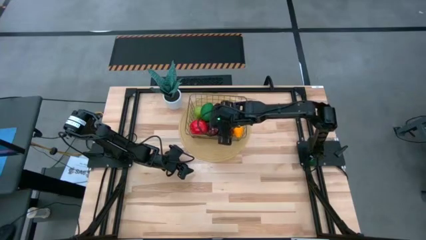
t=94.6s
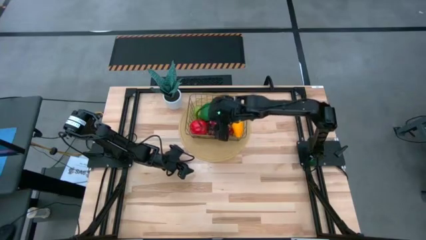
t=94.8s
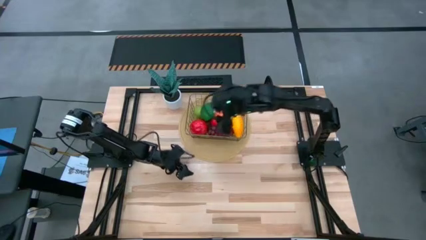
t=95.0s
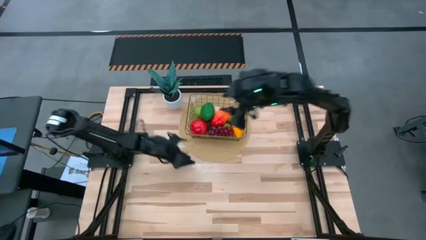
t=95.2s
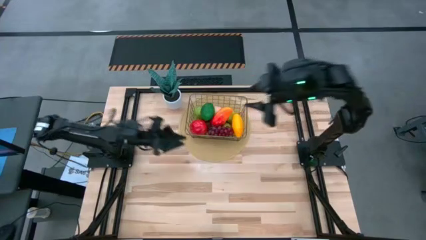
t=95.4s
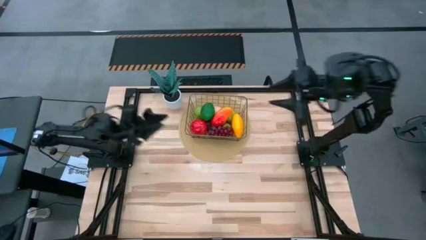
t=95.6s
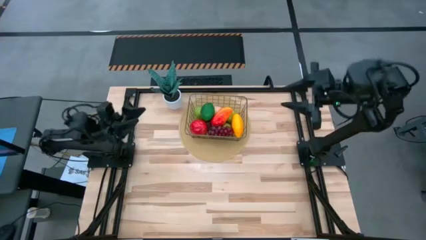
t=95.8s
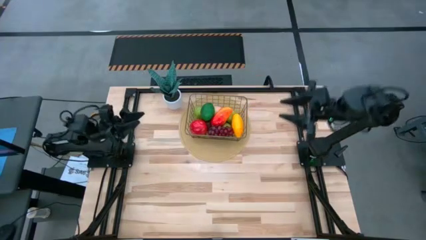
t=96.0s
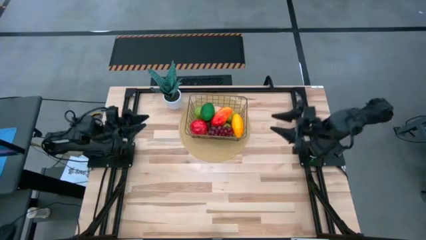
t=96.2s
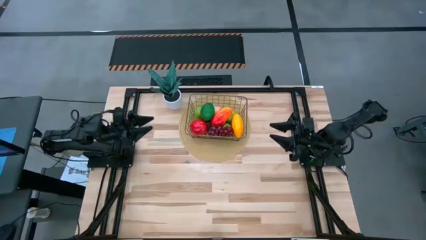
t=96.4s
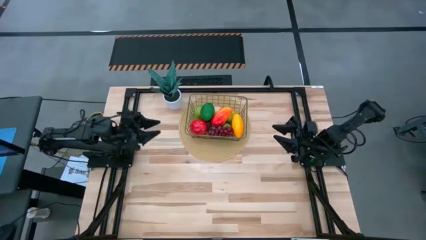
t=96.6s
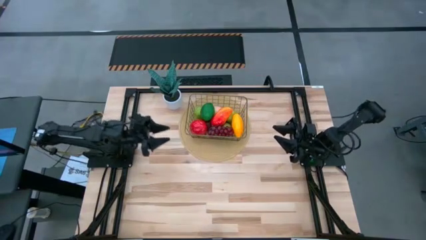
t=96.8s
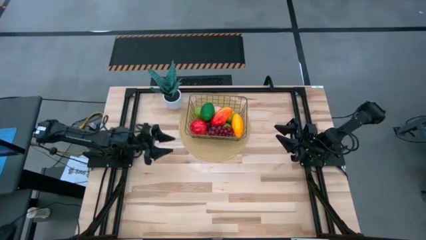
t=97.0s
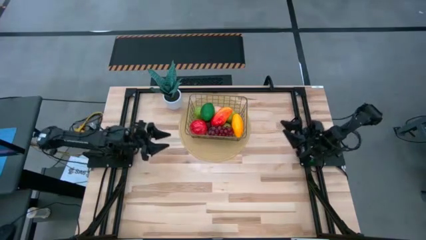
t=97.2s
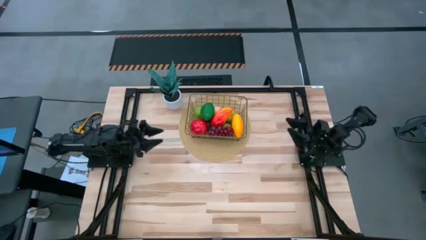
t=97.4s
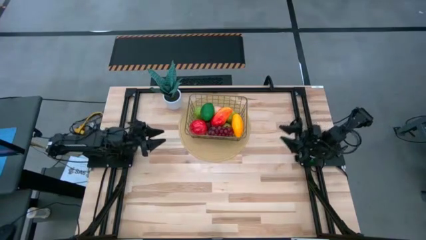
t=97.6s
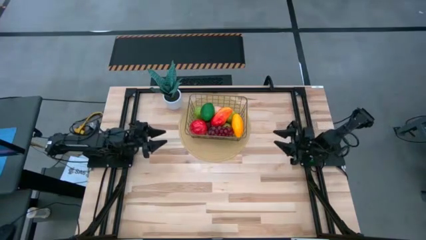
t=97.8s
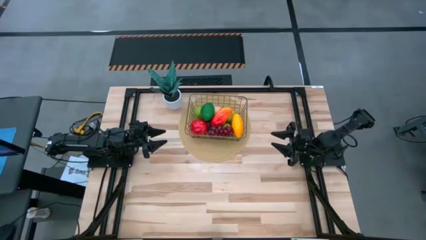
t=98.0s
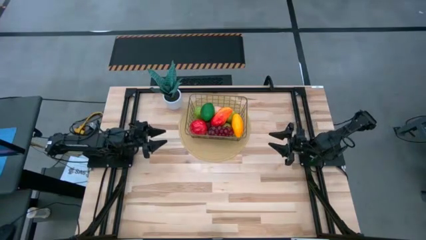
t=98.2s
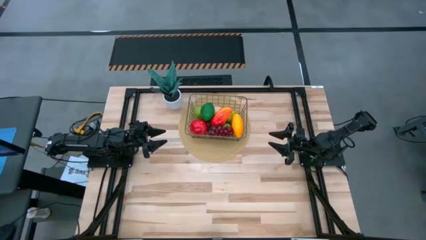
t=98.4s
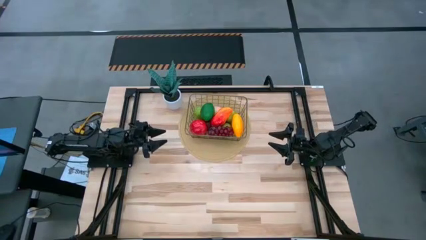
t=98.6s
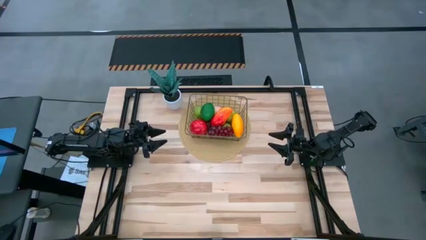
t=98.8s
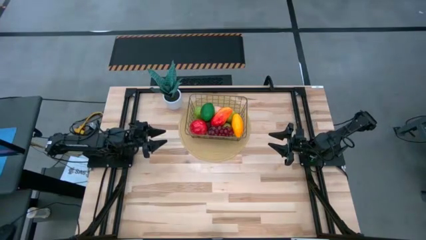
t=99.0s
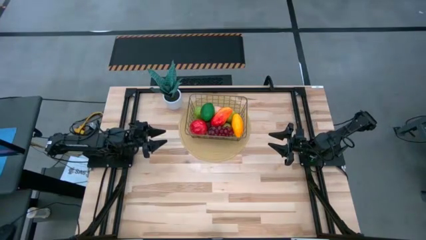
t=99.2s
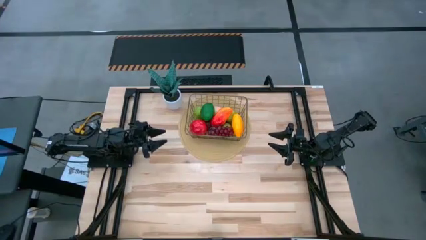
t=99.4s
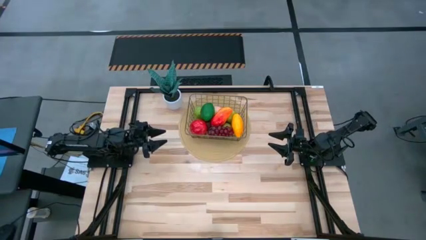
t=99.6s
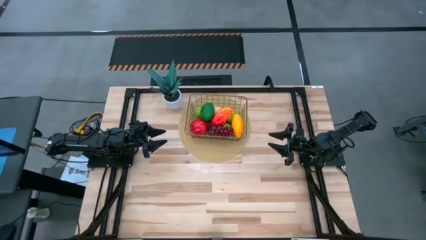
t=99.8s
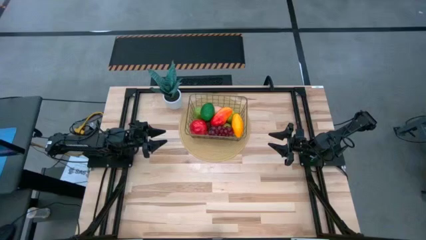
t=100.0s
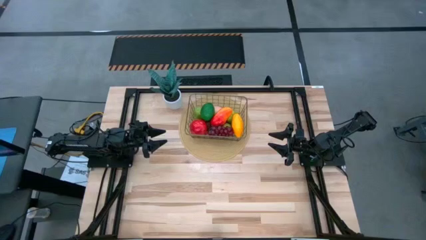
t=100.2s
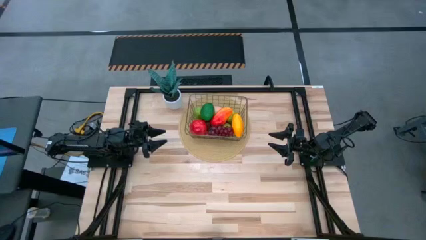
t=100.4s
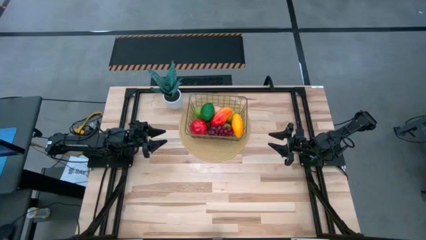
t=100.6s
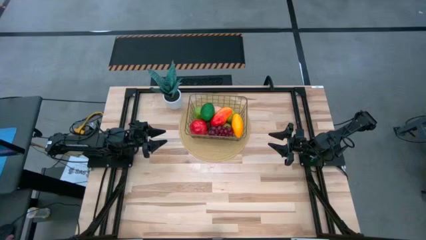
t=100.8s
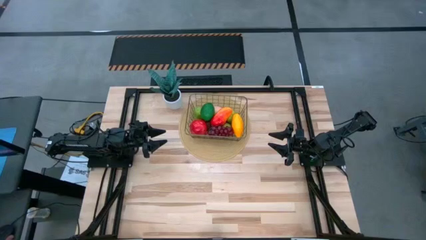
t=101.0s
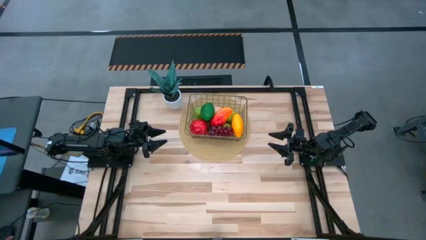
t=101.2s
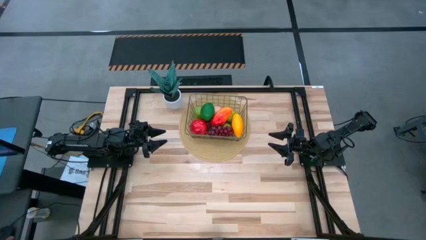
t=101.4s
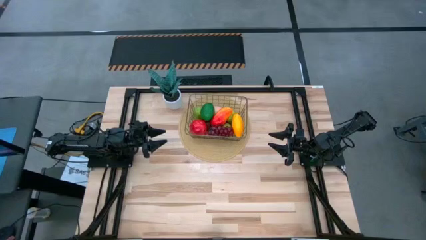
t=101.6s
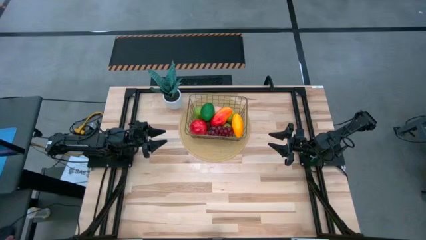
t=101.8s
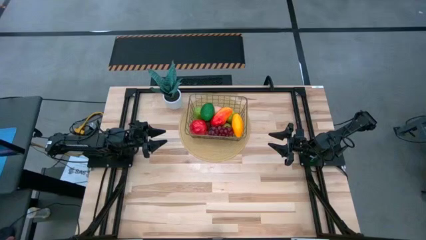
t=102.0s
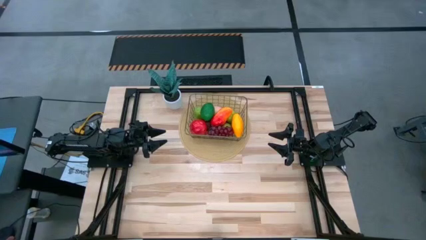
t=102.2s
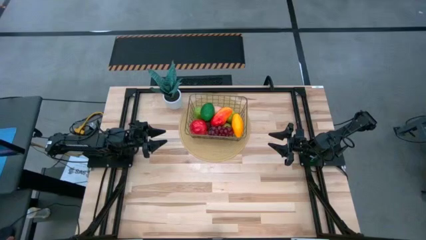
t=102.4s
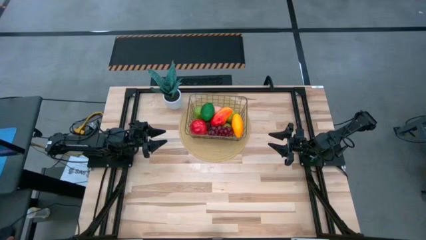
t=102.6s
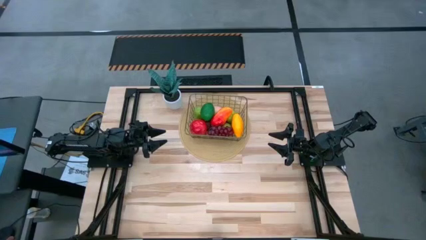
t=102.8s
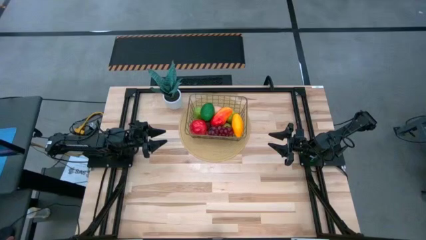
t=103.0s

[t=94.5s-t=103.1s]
Task: Build produce basket
Return to Home Position

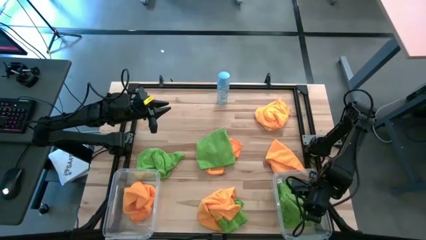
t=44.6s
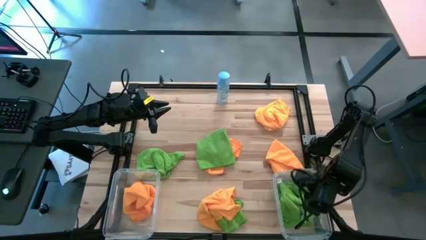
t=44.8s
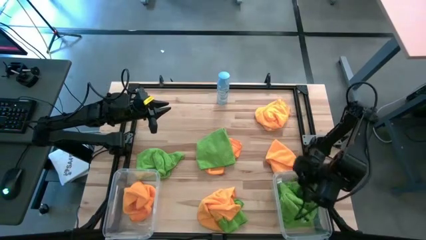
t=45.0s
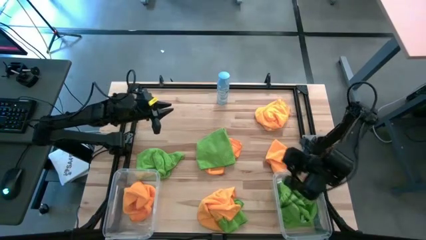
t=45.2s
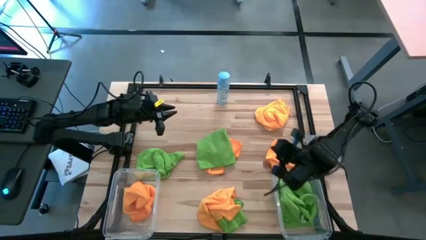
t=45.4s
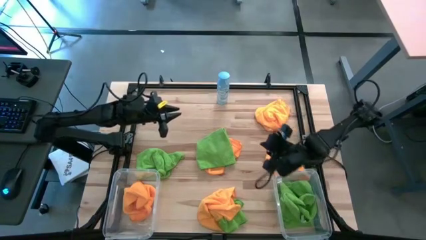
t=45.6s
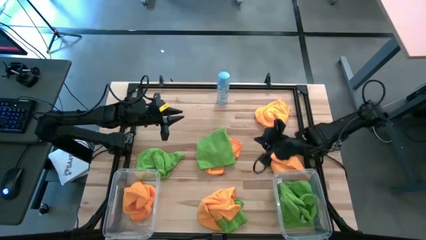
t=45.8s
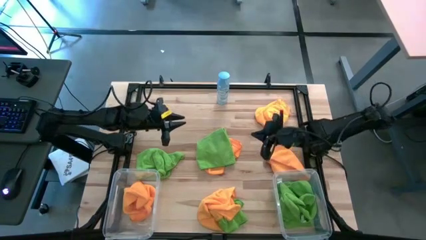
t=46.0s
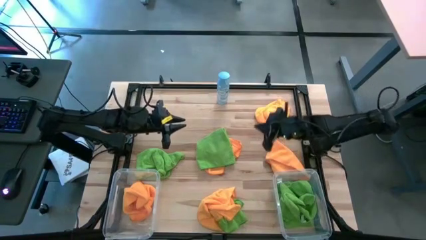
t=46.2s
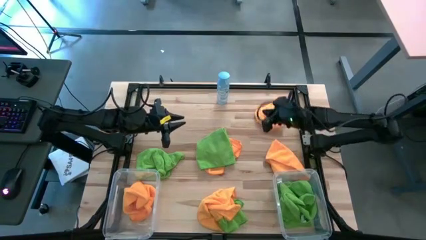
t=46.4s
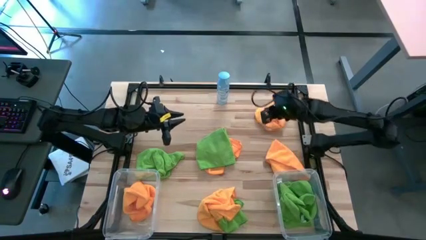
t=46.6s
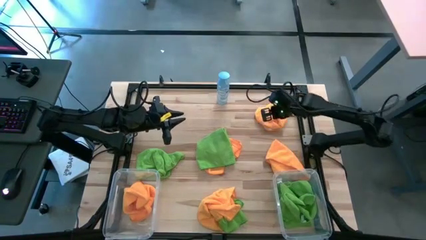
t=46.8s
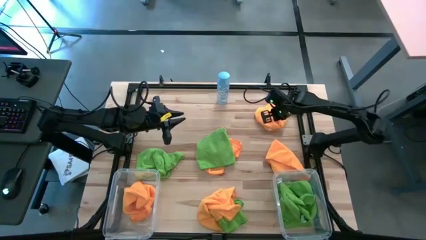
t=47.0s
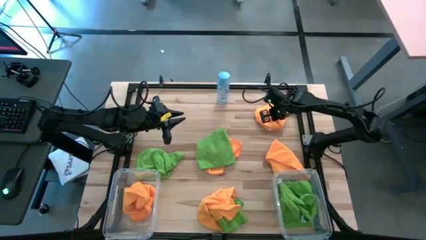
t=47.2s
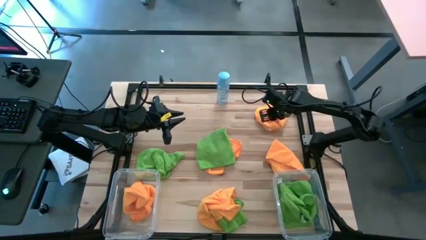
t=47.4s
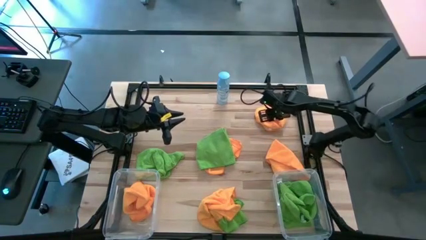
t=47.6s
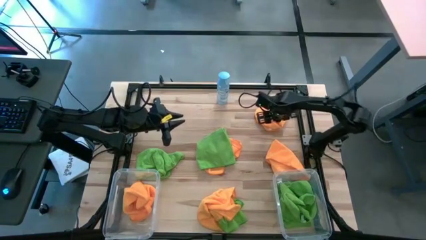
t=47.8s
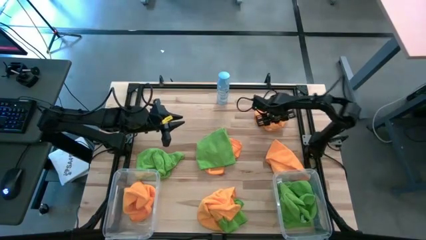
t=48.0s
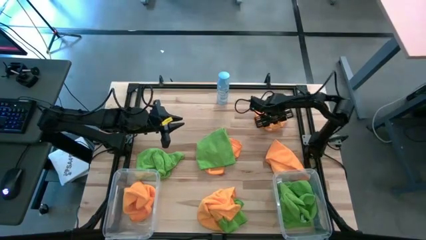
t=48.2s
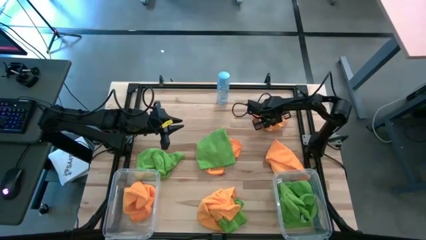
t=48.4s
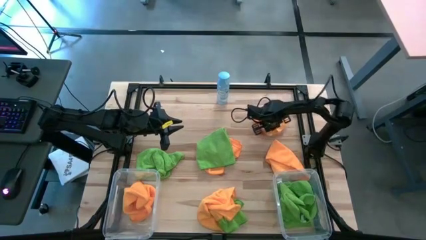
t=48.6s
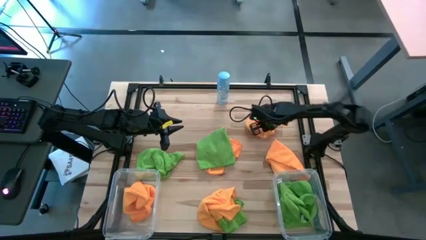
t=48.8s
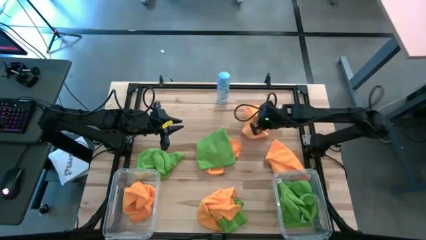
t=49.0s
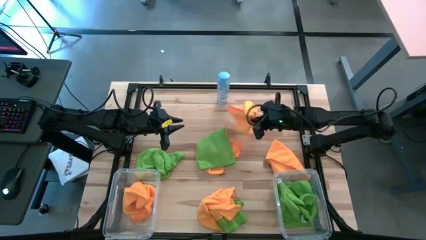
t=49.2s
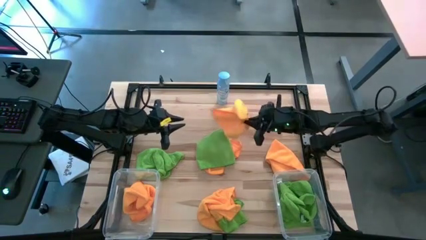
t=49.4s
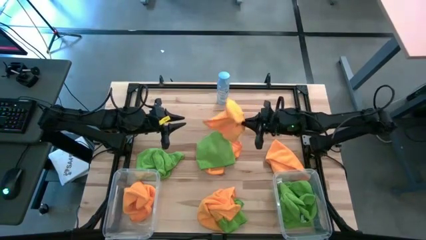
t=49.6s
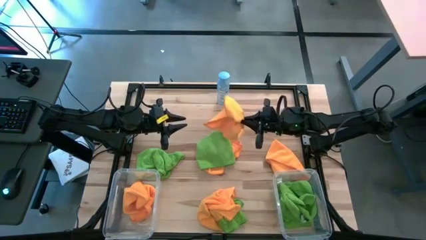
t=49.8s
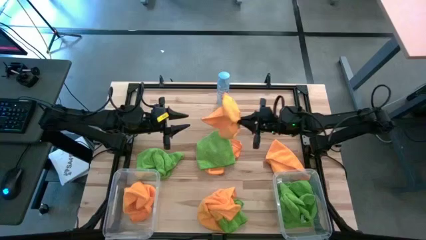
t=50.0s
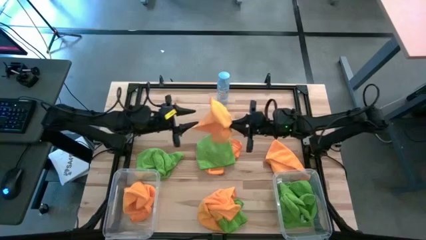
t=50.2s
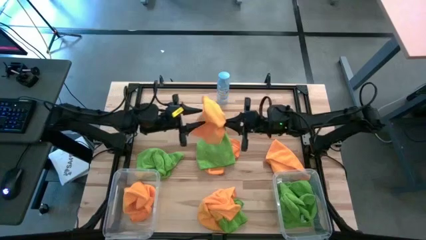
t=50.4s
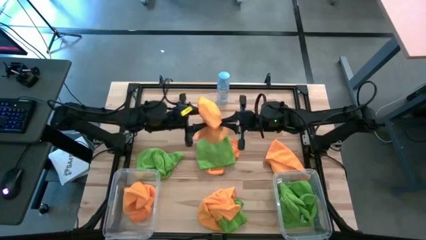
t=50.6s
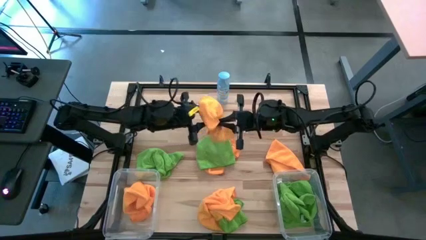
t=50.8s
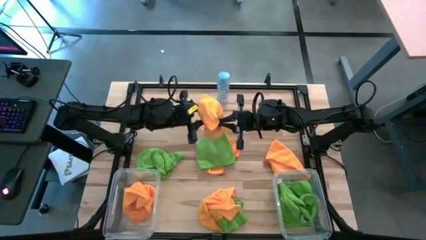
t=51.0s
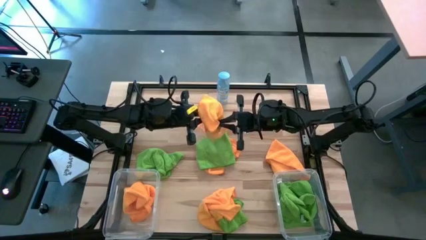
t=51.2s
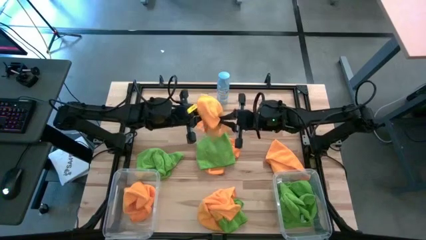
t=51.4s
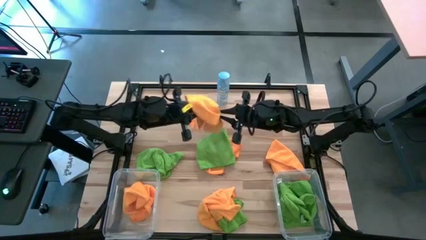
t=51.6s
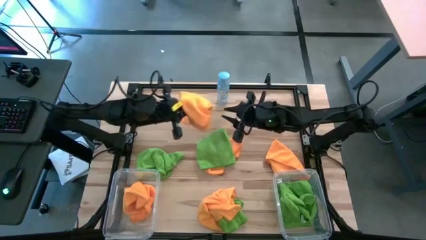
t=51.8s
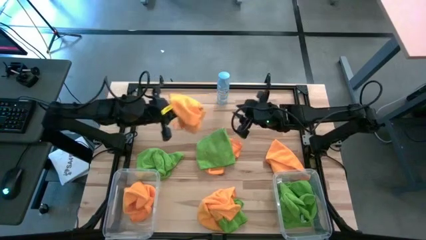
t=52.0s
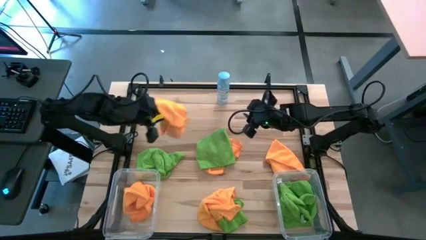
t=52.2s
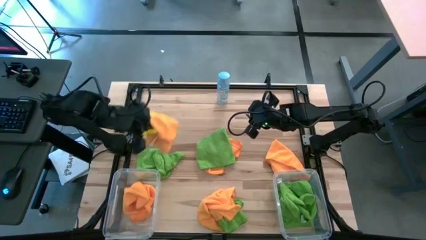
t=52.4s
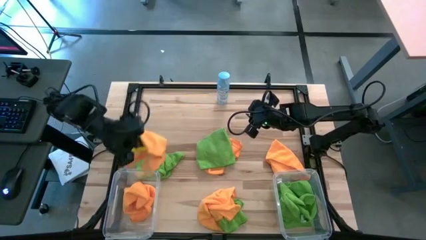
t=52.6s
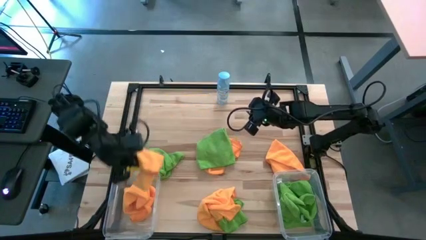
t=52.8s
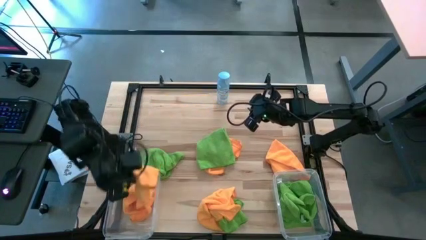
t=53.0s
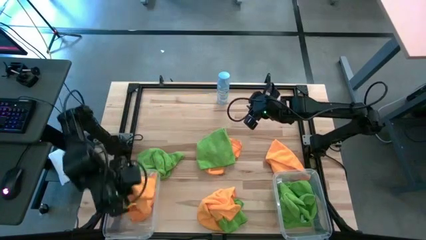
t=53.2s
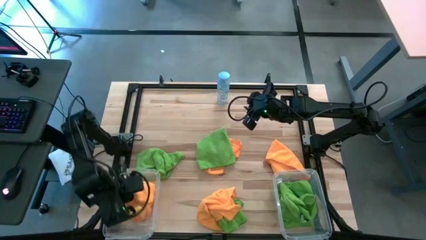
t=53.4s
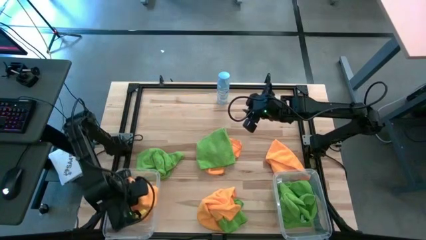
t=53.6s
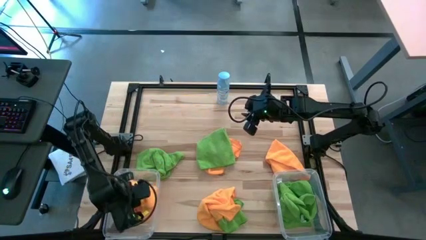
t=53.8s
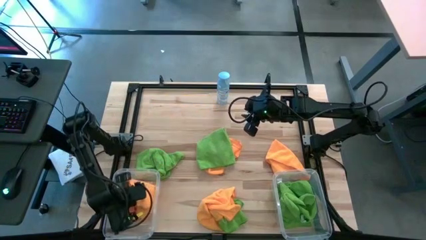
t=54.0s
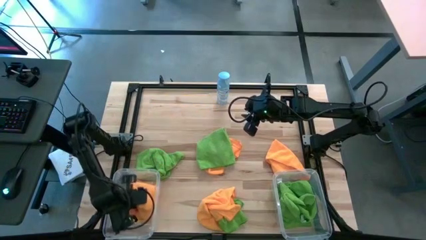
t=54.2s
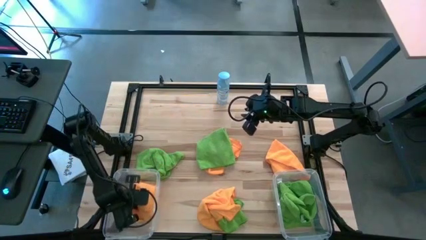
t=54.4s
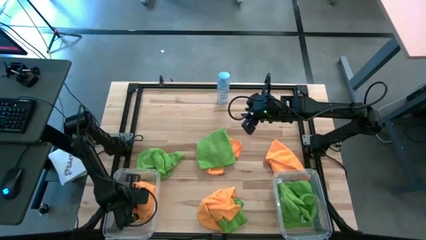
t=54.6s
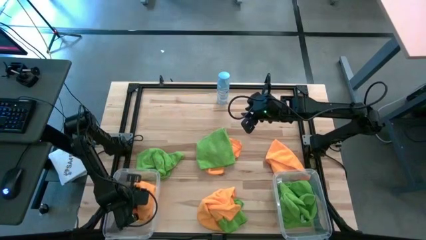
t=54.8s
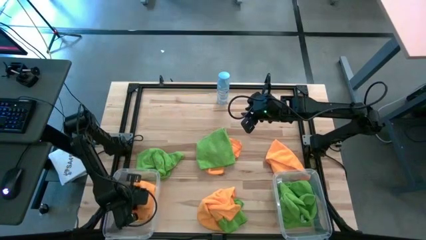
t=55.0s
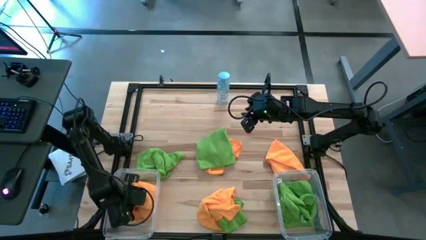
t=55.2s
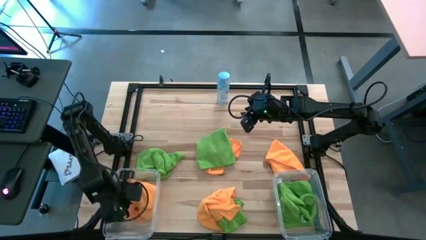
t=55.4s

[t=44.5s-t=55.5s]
Task: Sort microfiber towel by color & place in baskets
Put the orange microfiber cloth into the left transparent bin
